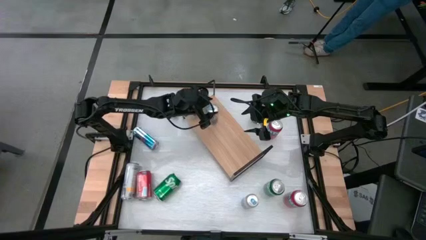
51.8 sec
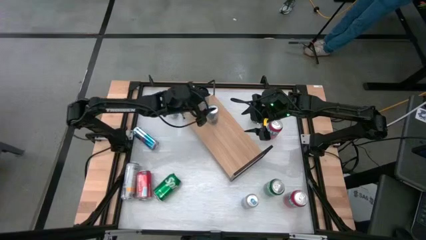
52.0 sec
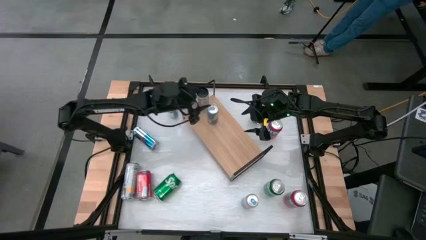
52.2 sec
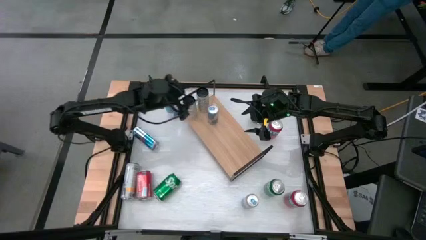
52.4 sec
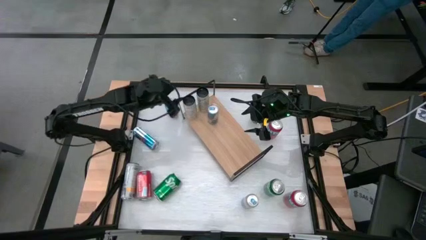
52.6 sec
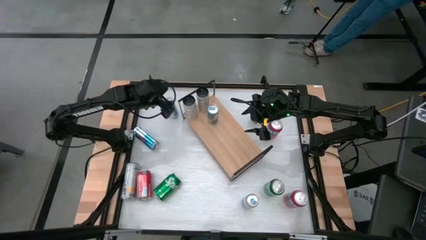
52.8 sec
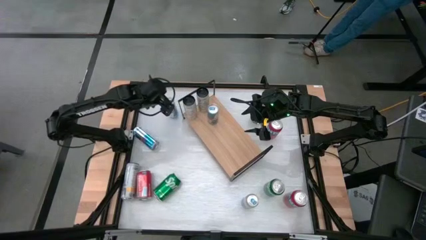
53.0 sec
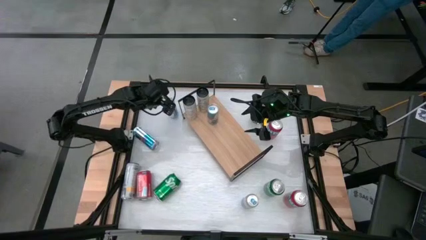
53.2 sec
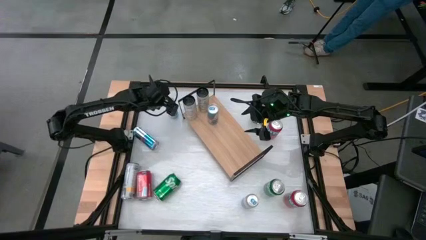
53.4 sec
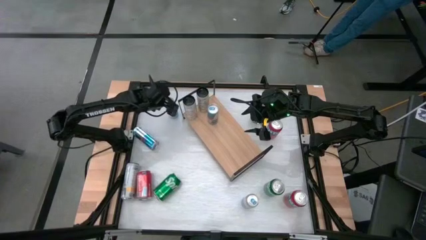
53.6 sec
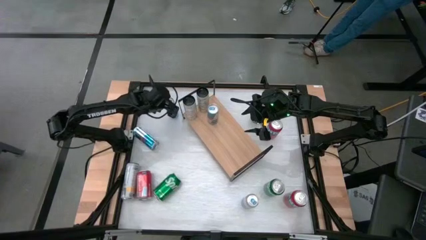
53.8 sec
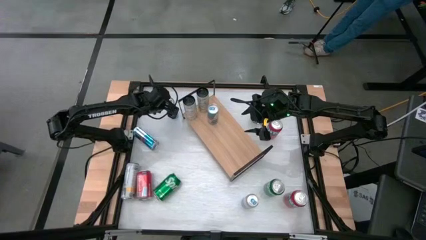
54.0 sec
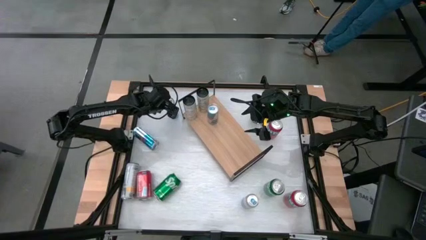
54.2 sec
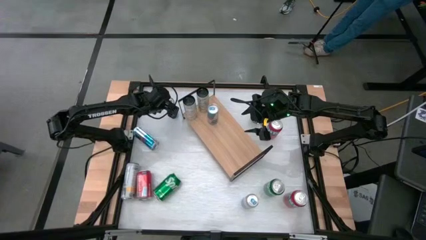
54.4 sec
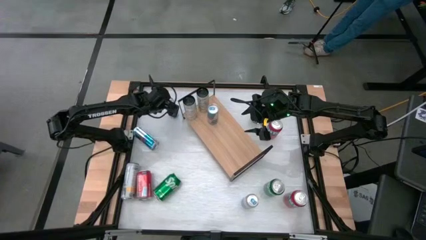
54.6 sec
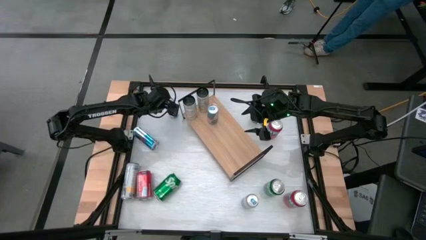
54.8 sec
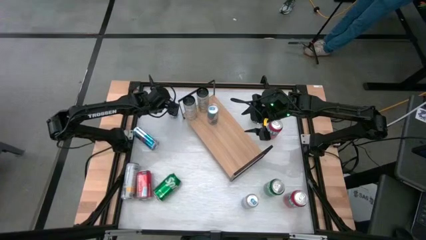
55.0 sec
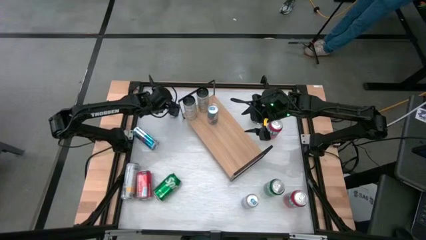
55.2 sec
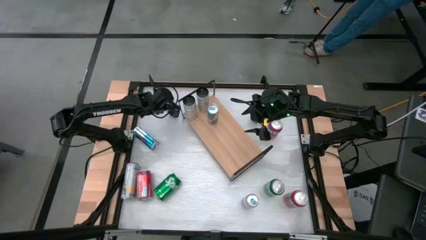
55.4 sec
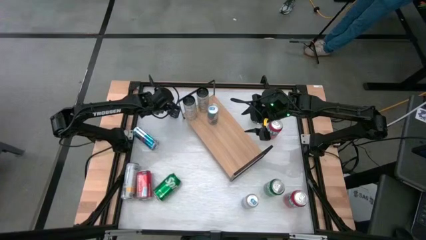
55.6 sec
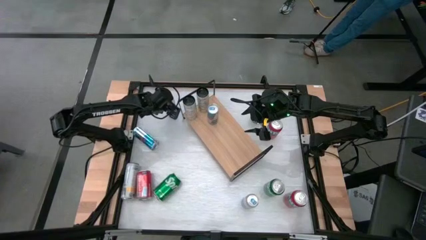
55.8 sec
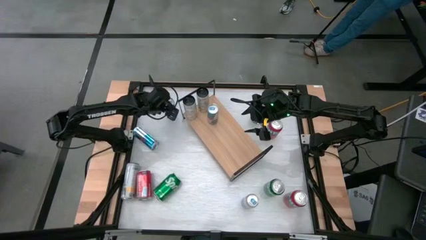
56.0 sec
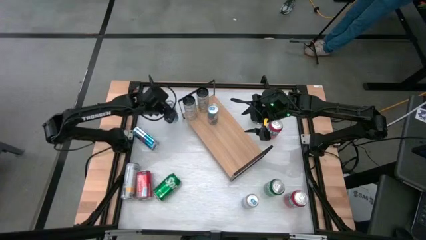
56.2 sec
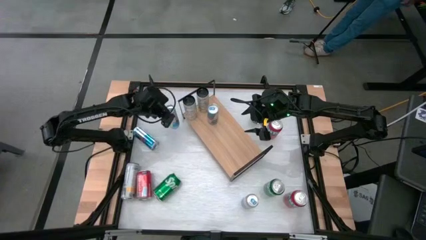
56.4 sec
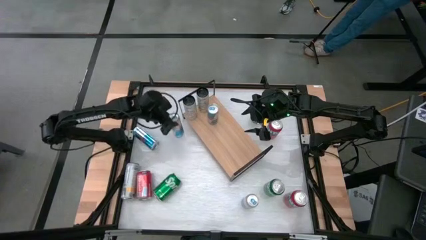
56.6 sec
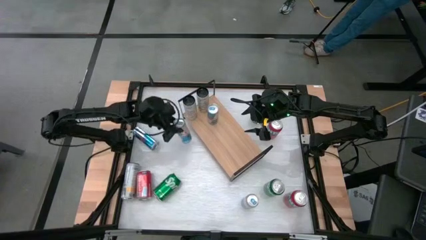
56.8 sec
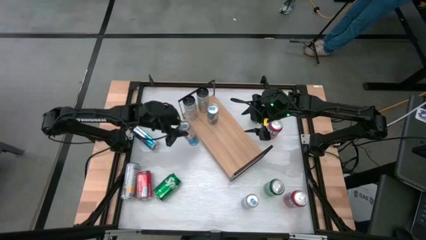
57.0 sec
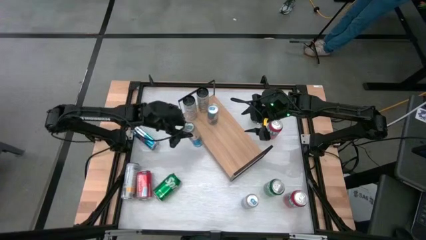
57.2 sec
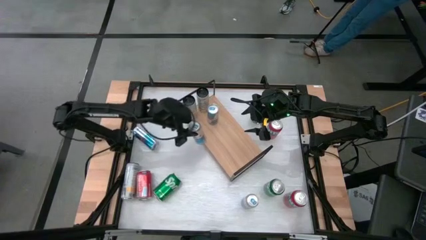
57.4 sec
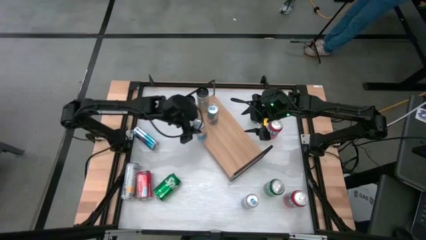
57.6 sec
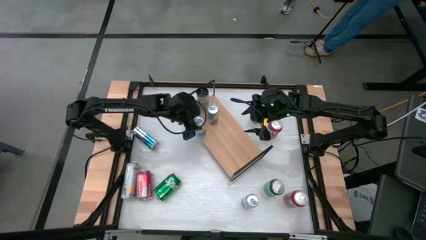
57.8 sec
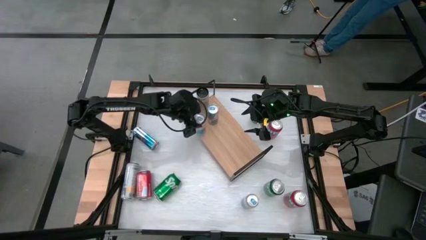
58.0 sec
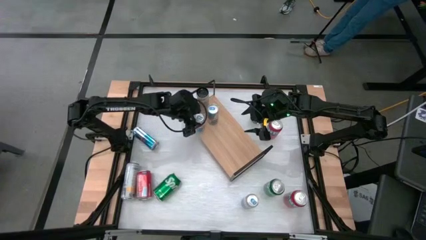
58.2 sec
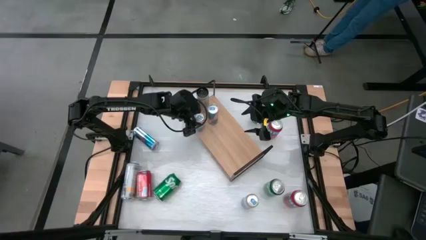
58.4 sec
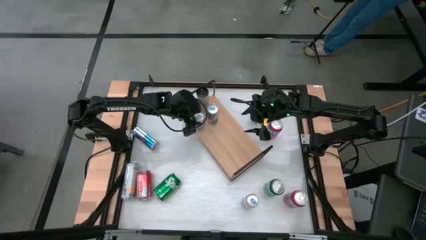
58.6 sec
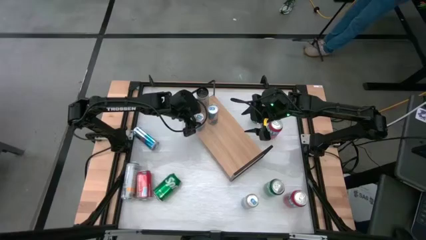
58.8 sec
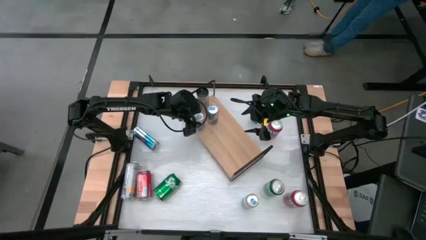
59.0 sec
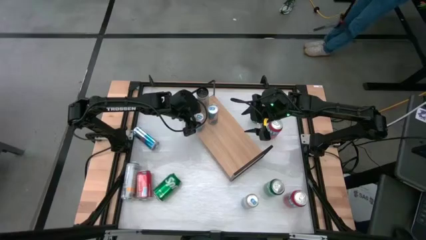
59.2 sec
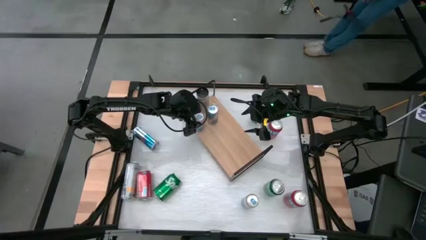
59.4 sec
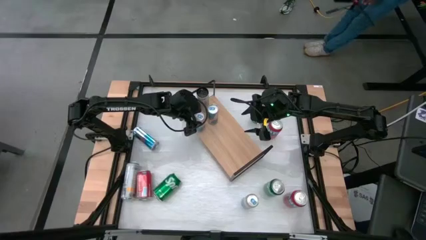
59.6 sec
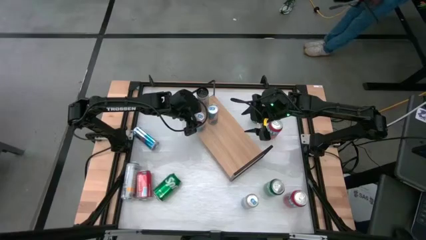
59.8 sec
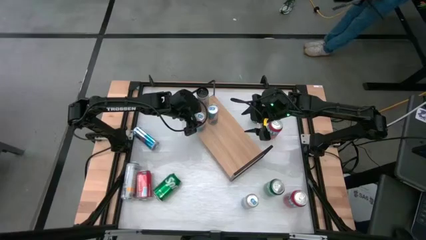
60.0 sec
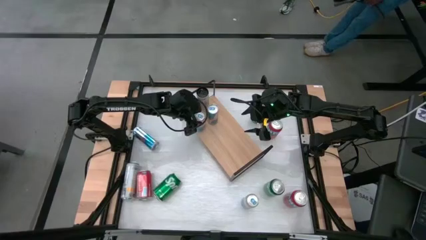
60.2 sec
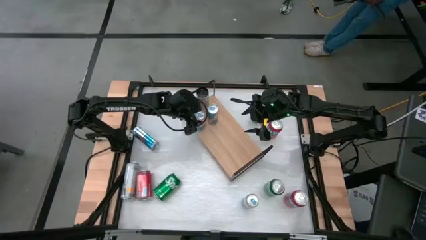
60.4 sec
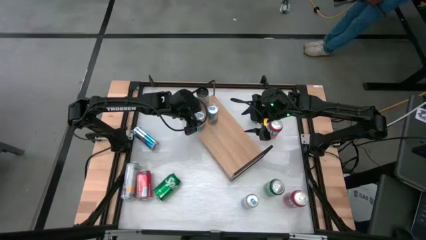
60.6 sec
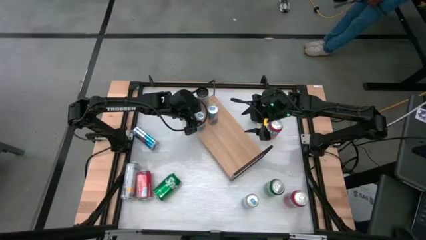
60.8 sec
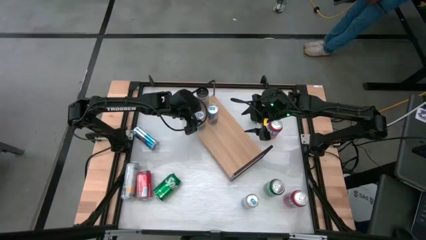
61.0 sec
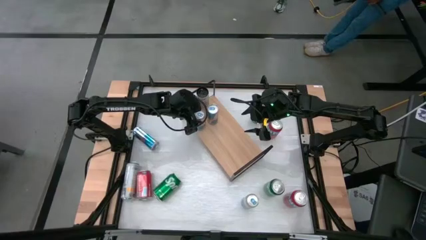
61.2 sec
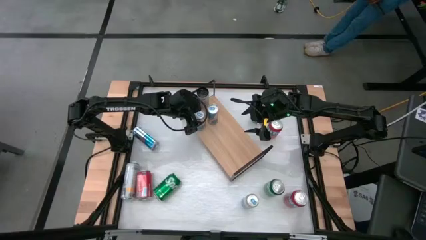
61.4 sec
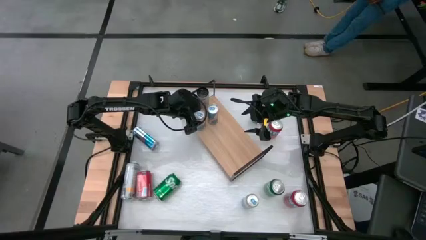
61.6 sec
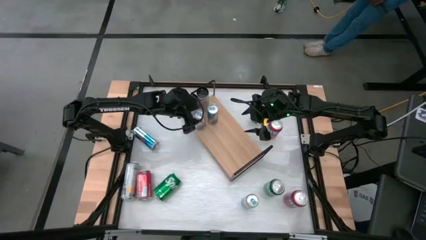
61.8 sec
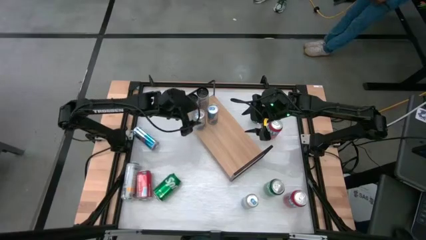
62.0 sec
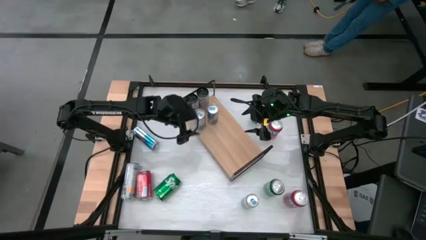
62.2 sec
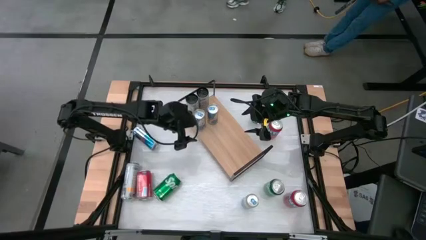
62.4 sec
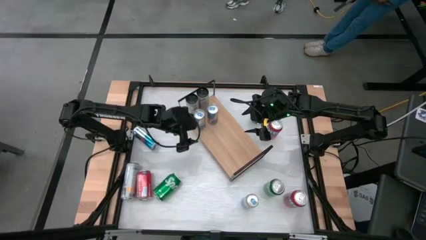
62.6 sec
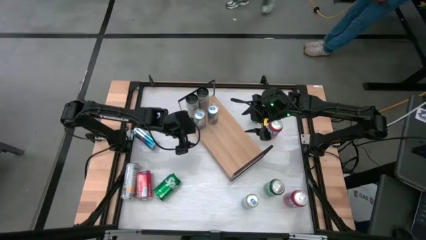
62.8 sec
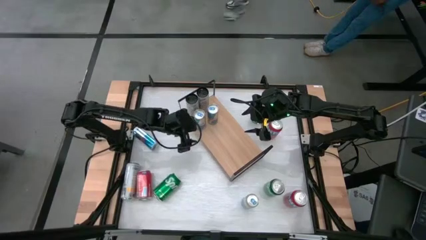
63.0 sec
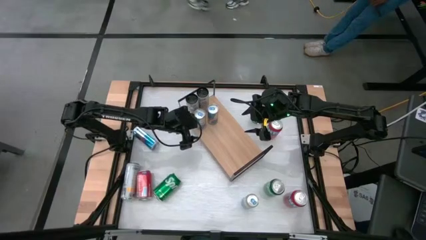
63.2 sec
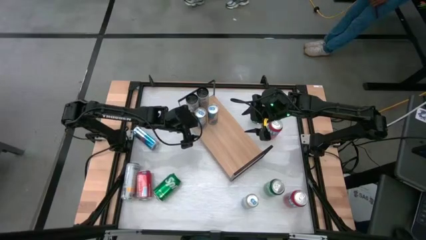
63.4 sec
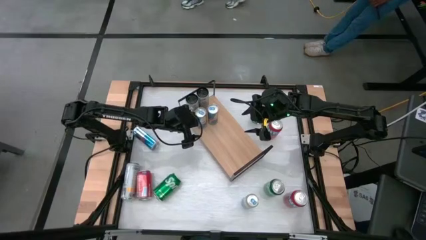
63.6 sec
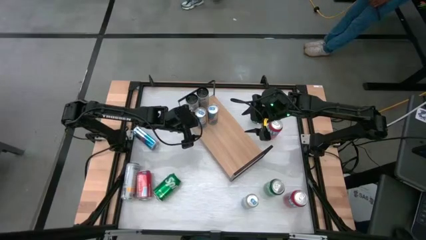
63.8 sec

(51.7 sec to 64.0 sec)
Task: Place canned beverage on shelf
Put the top blue soda can on the shelf aligned with the other blue soda can
